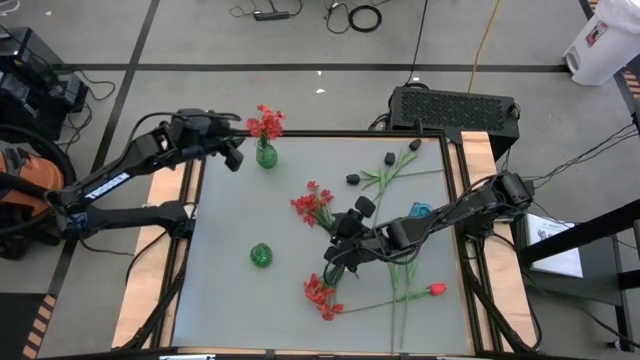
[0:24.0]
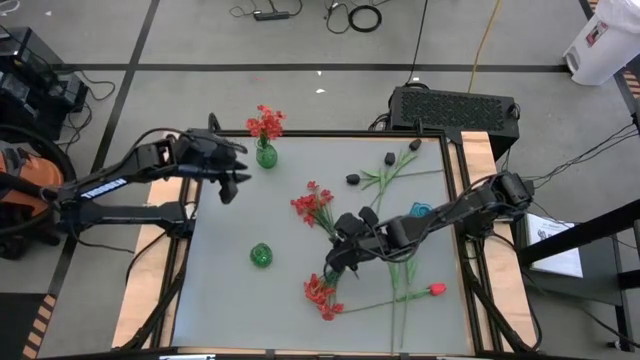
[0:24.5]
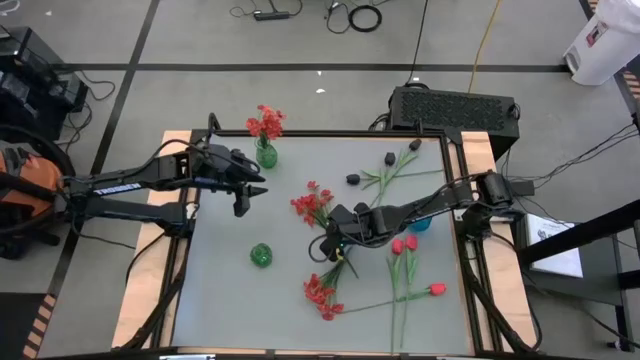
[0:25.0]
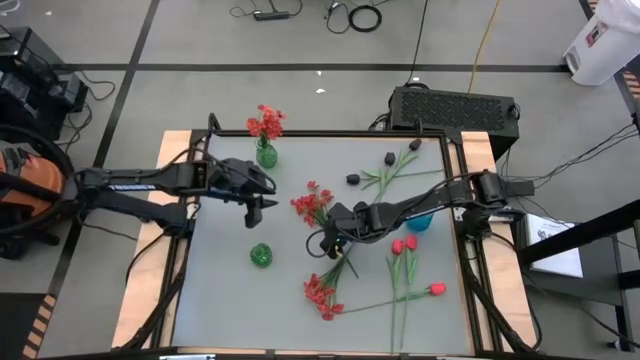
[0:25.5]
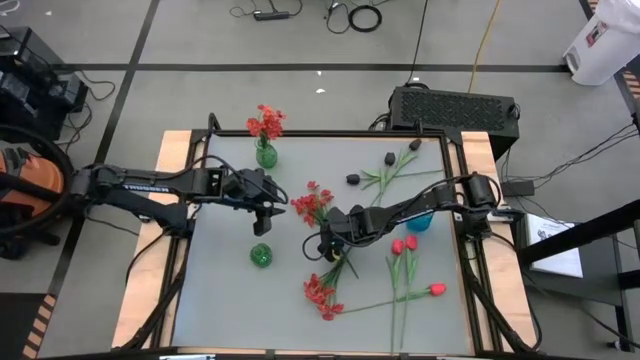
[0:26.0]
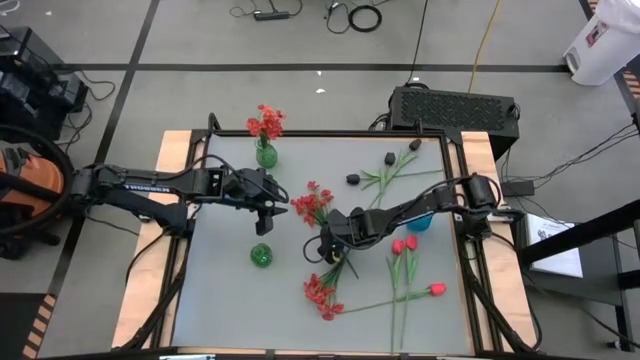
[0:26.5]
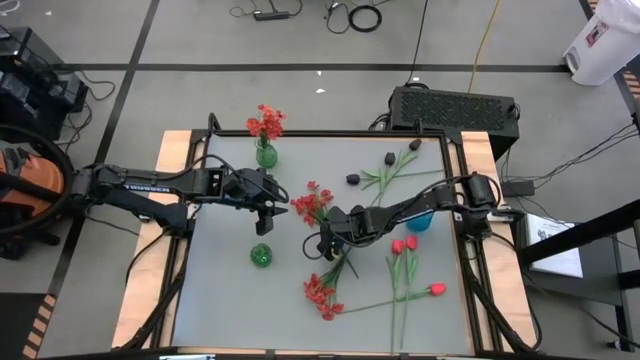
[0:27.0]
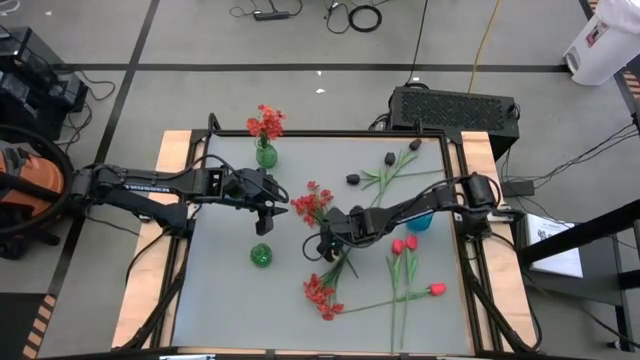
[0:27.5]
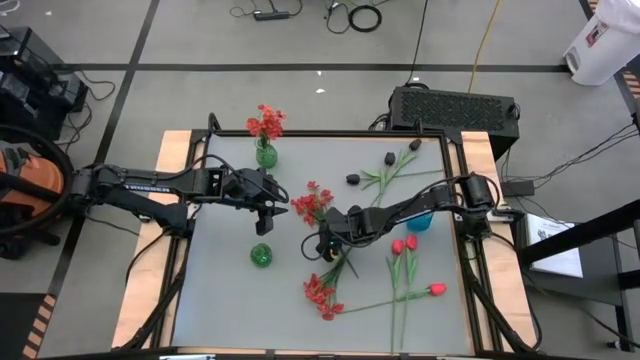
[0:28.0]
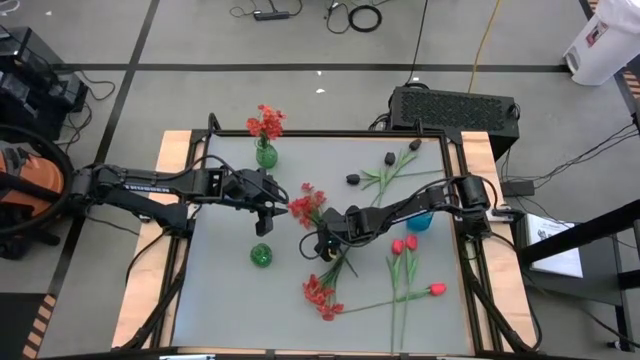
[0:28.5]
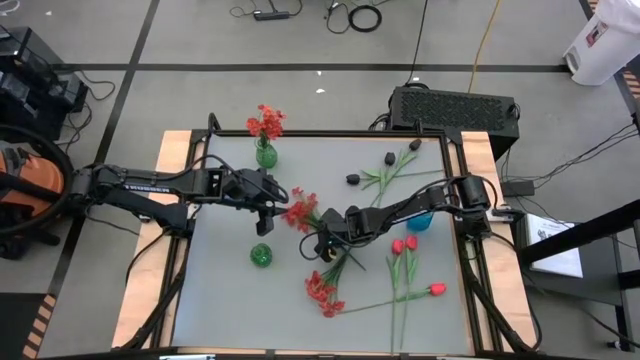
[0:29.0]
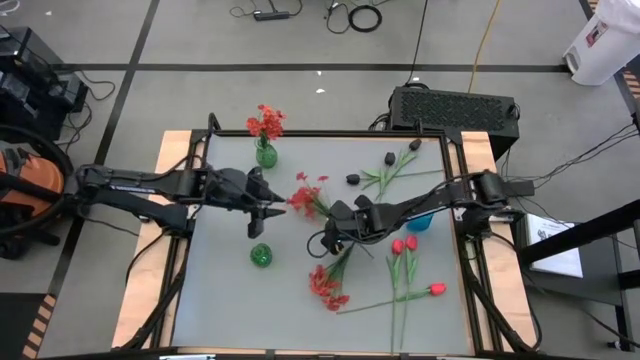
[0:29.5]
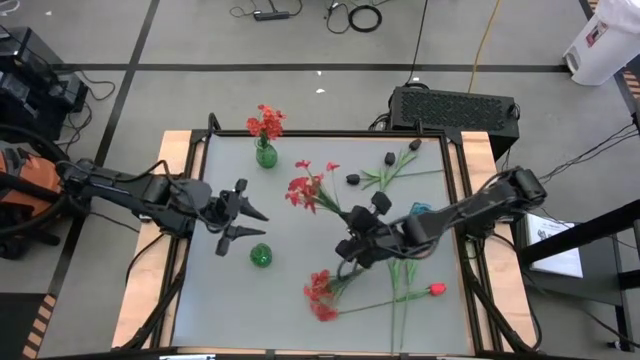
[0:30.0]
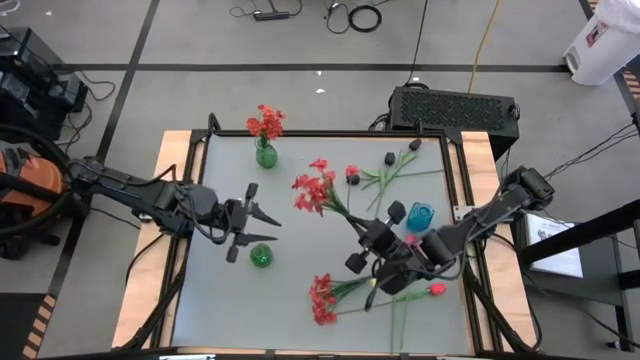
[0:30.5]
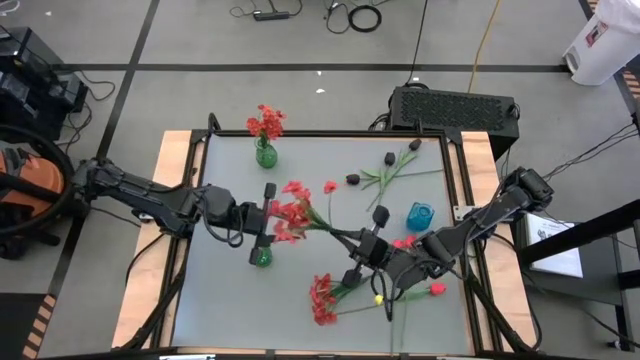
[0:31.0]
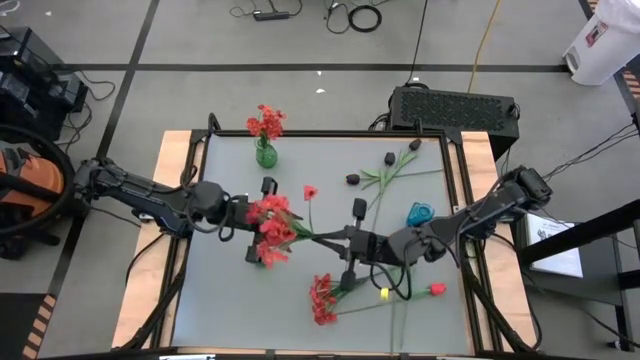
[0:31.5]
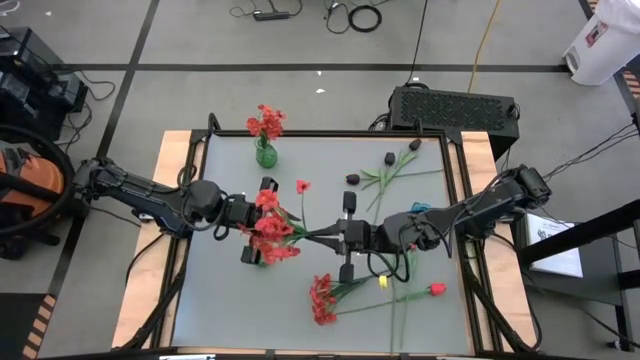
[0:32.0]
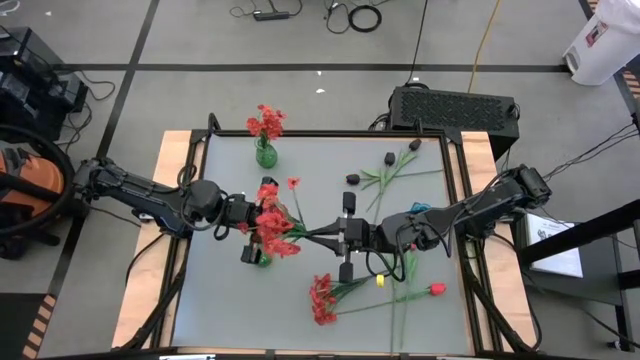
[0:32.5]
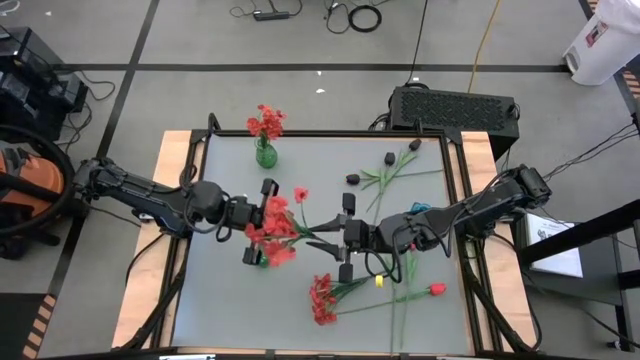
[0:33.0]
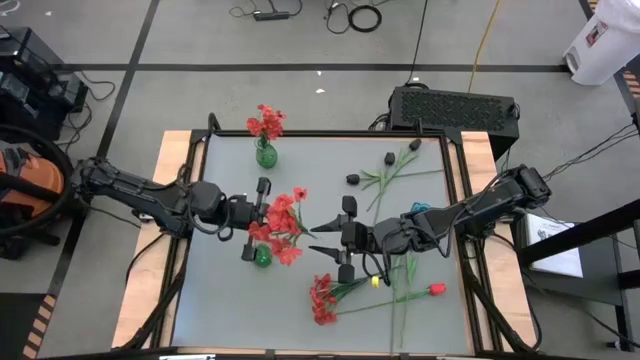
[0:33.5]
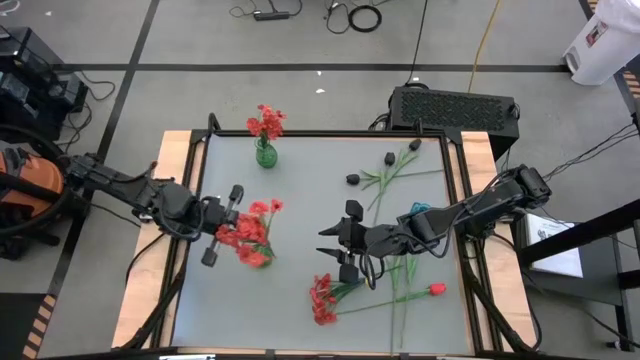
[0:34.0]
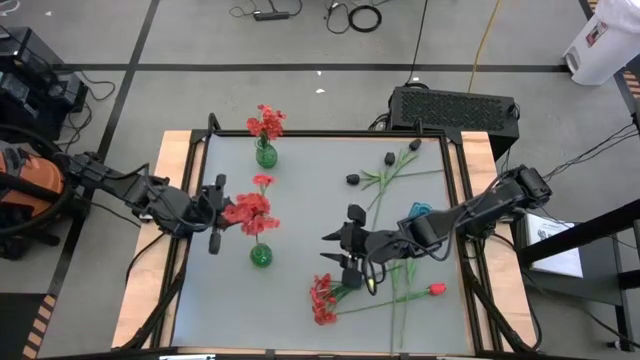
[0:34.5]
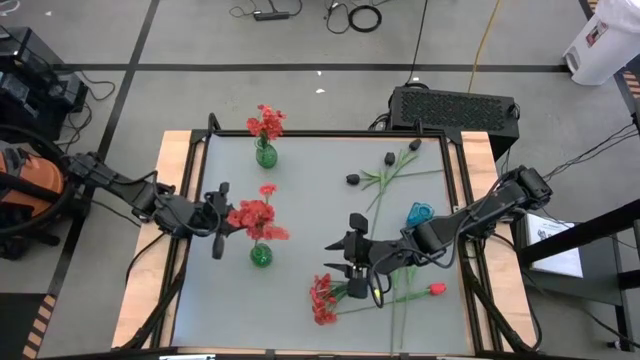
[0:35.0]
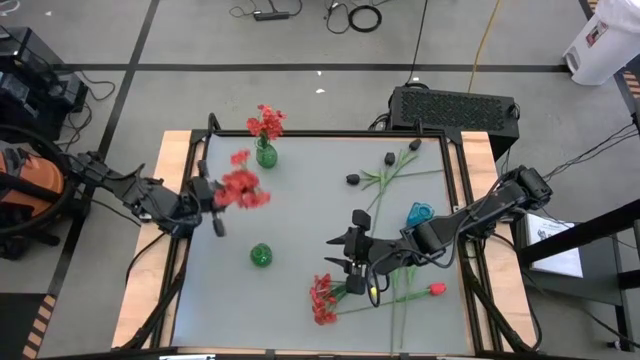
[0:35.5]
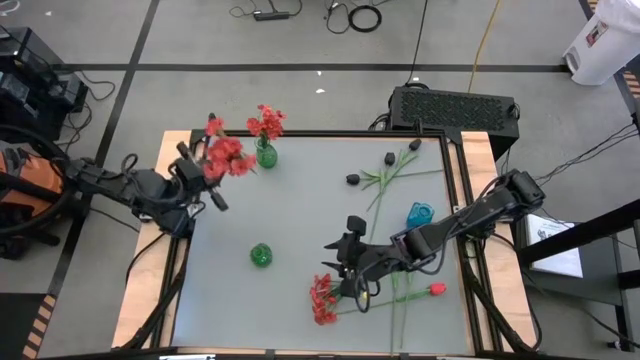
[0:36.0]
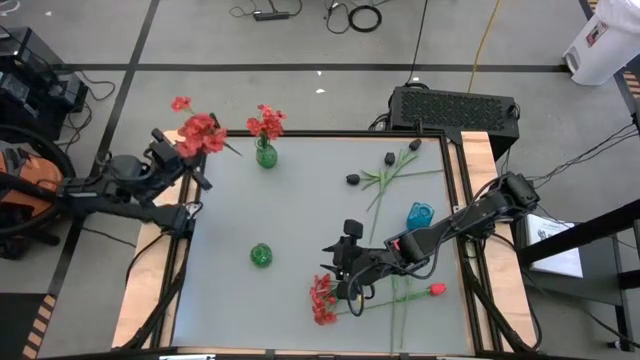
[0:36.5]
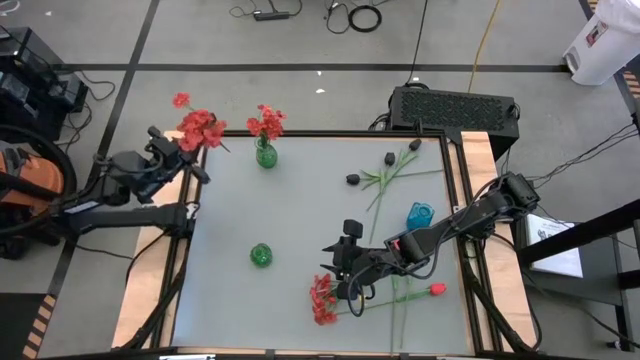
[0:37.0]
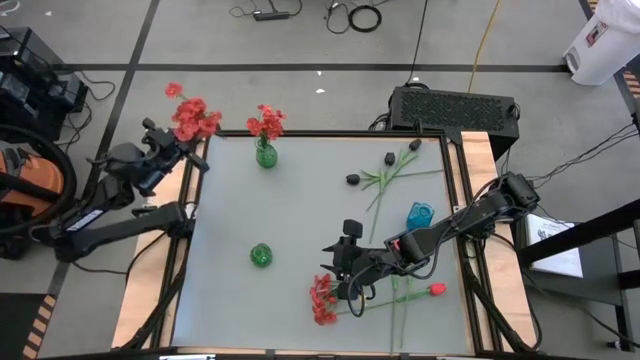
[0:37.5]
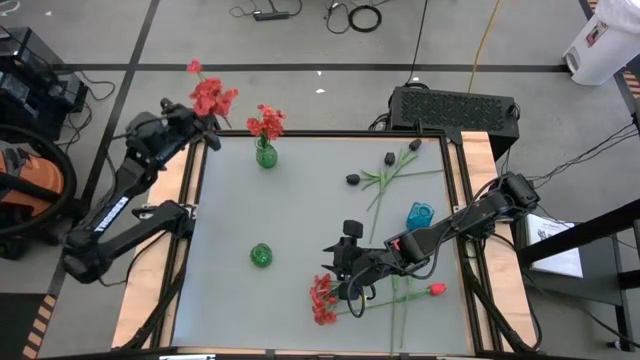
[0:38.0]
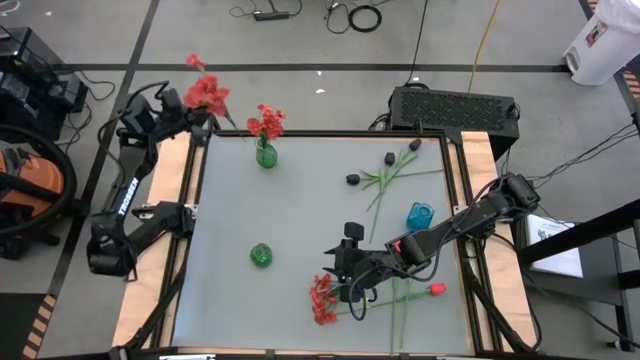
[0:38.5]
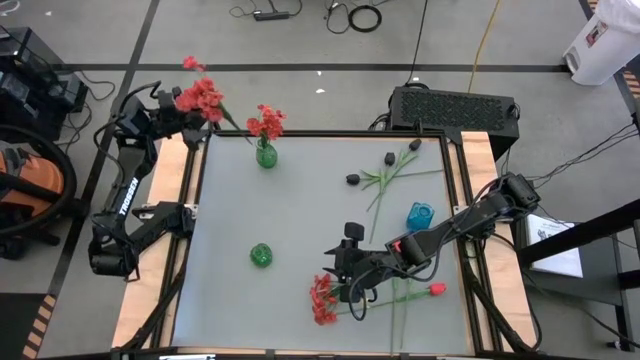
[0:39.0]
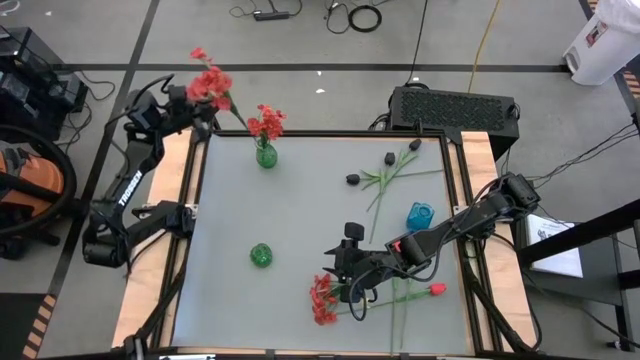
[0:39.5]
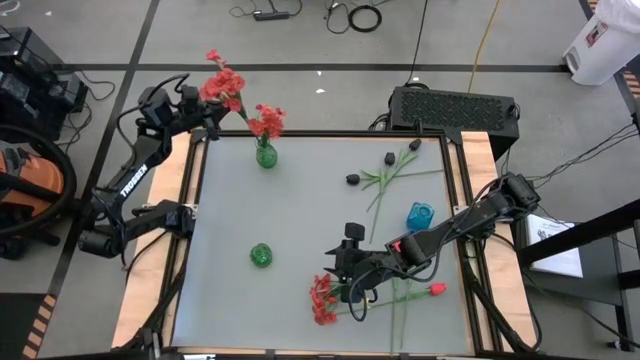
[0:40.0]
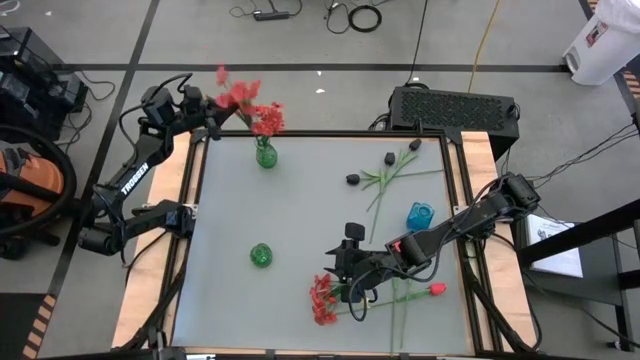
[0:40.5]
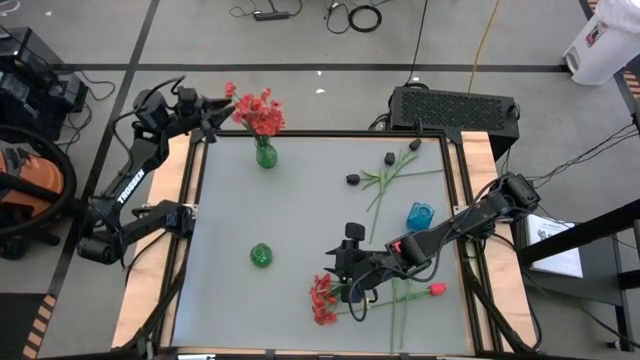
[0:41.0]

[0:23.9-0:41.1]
Task: Sort flowers into vase by color
Put the top orange flowers into the top green vase

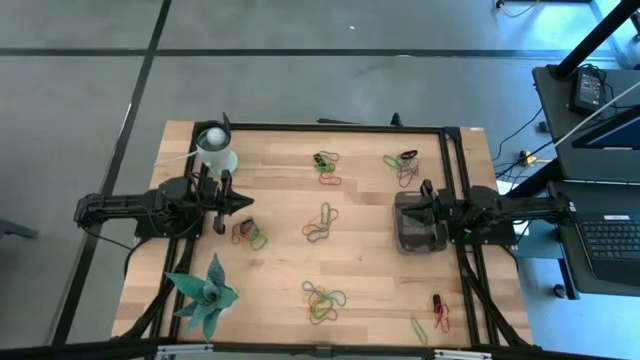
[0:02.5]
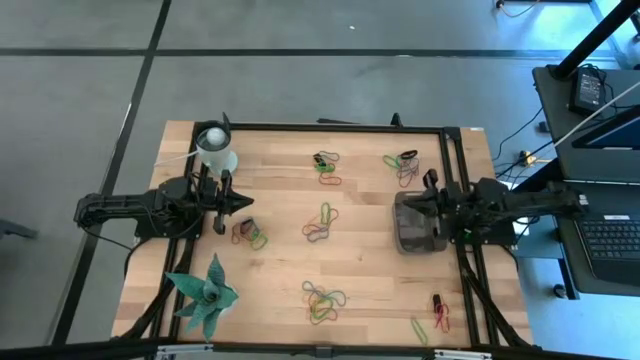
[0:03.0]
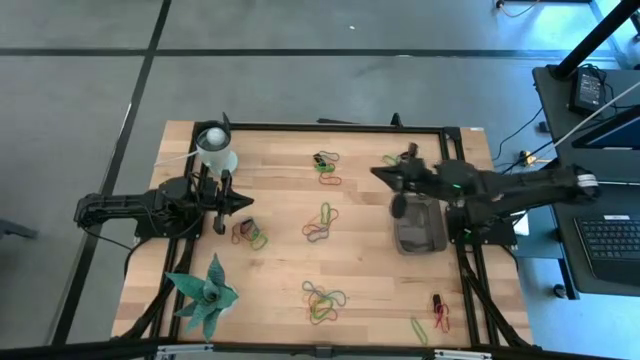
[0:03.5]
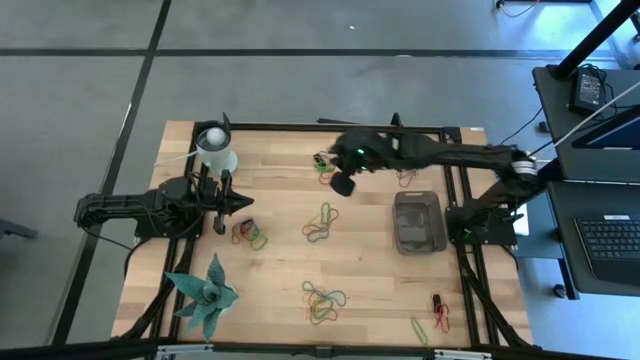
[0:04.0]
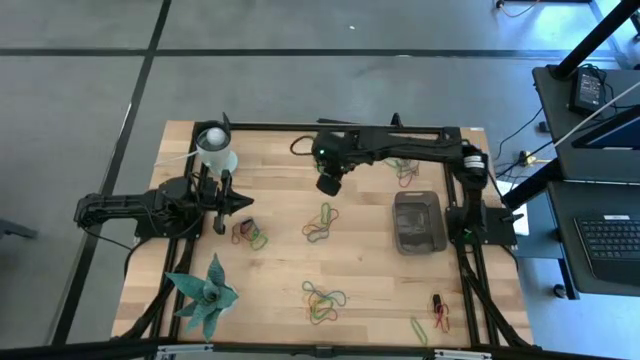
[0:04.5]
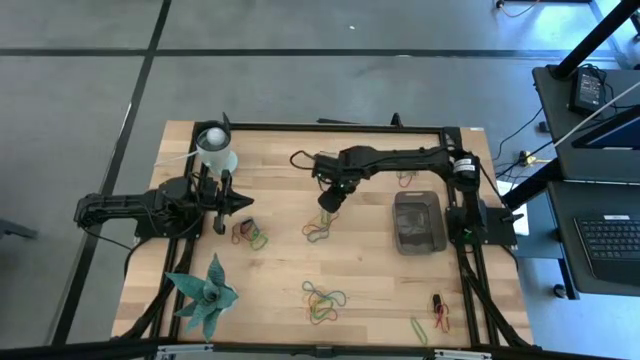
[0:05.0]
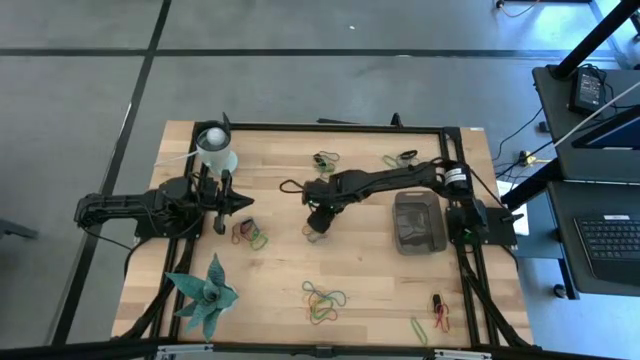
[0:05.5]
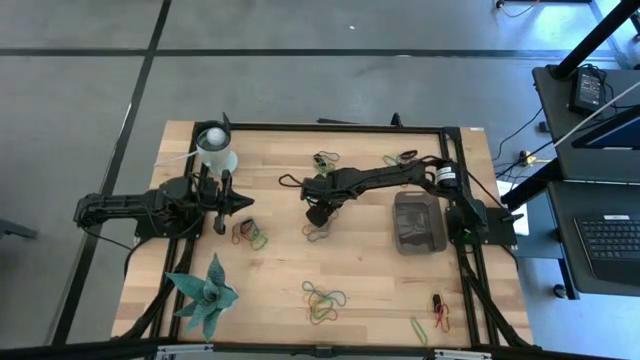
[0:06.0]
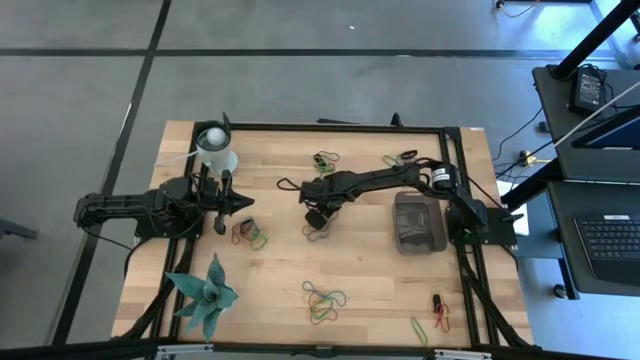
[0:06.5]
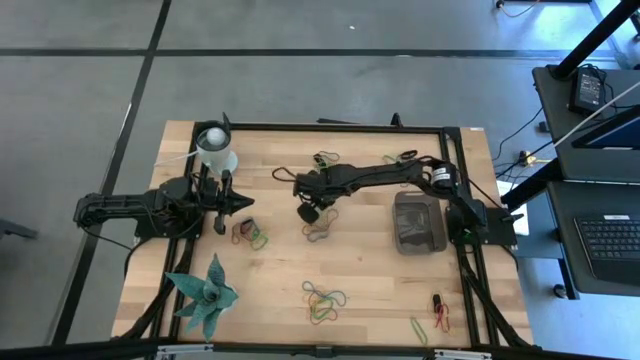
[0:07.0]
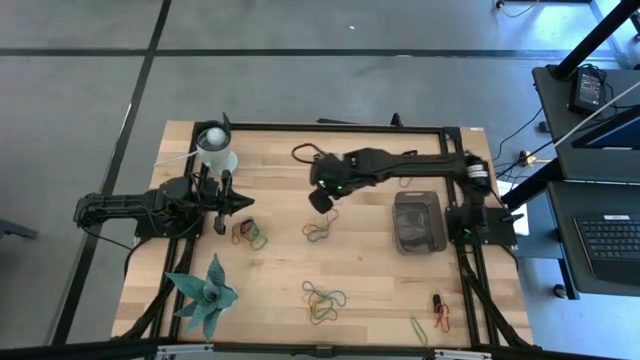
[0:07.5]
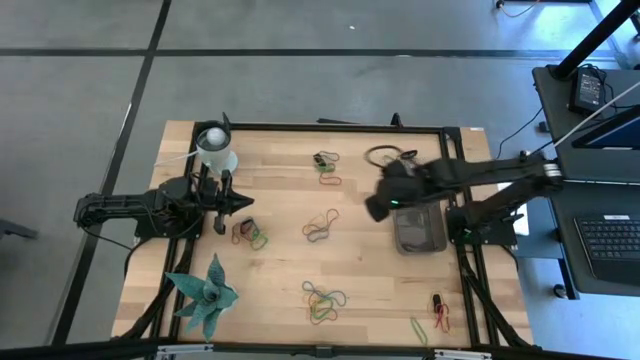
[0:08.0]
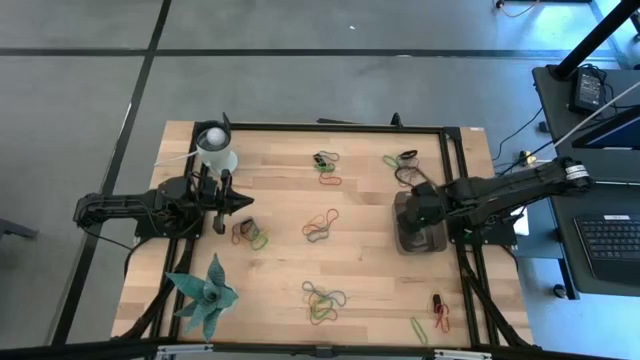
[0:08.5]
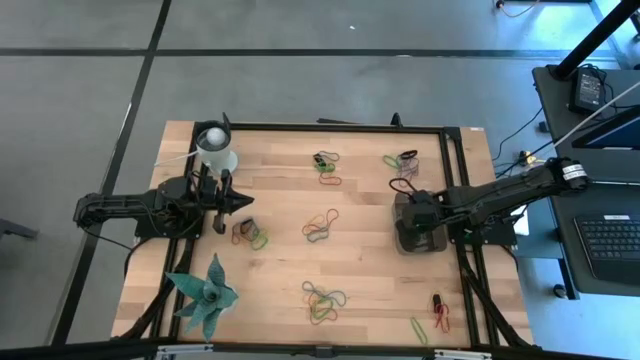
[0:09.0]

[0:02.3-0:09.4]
Task: Pick and place rubber bands into bin
Put the green rubber band into the black bin
